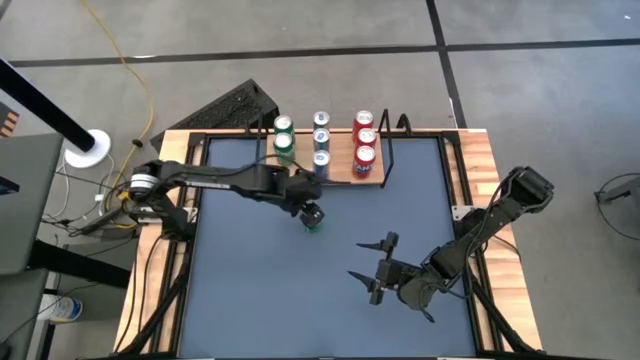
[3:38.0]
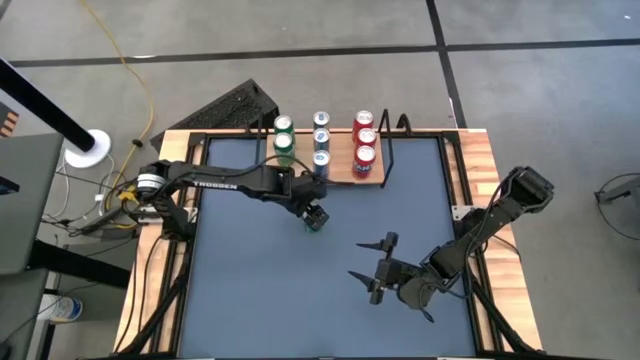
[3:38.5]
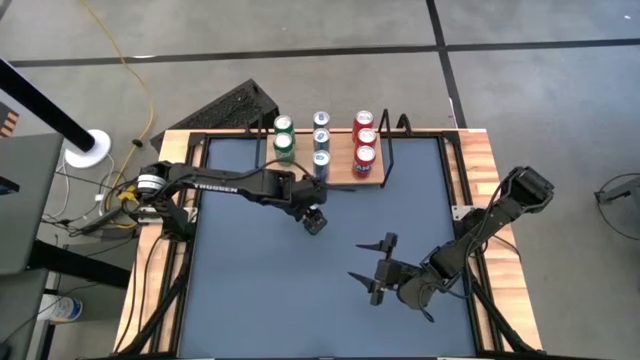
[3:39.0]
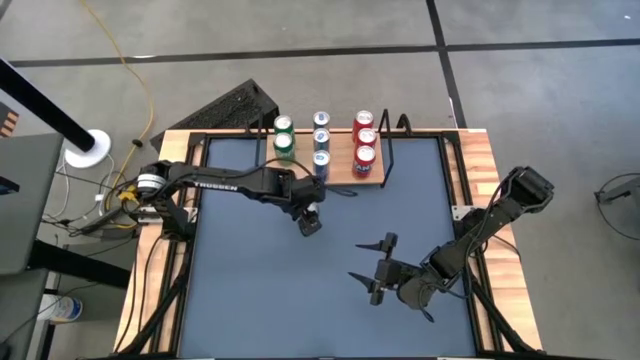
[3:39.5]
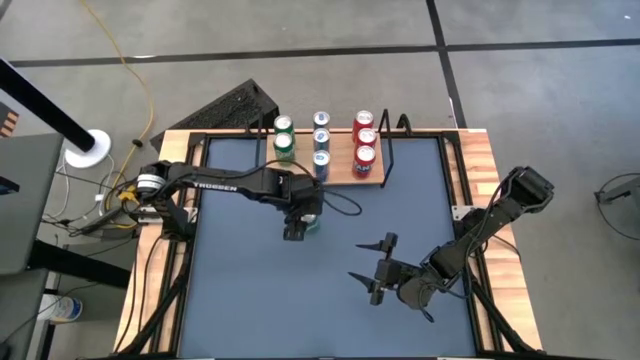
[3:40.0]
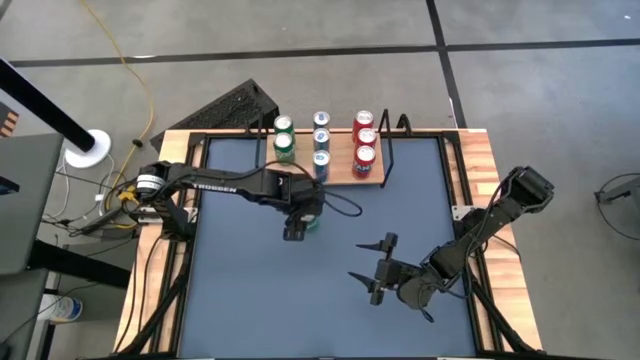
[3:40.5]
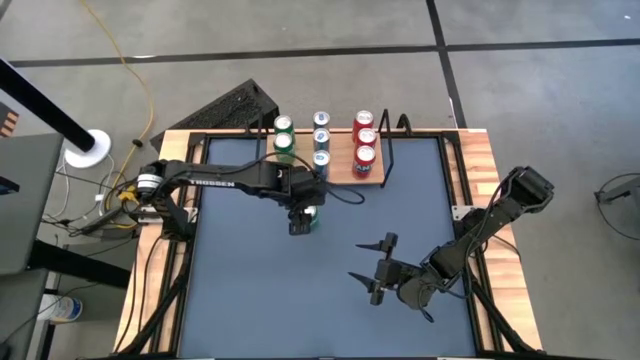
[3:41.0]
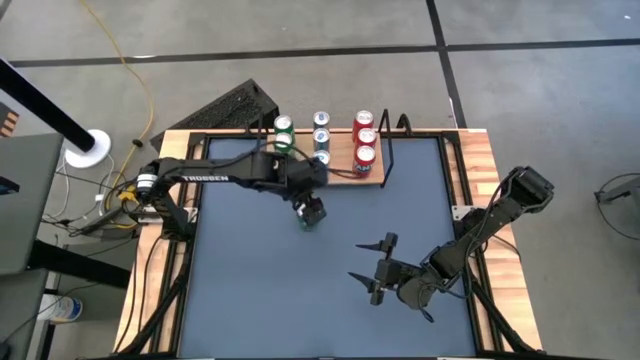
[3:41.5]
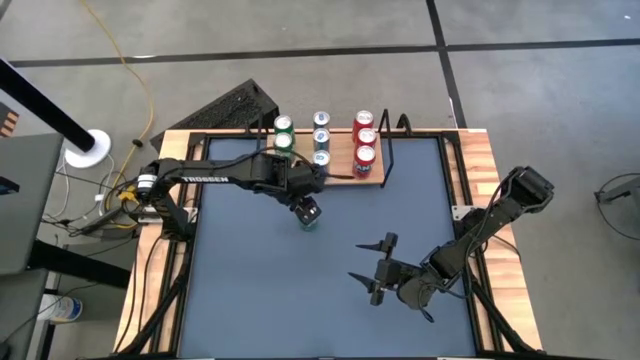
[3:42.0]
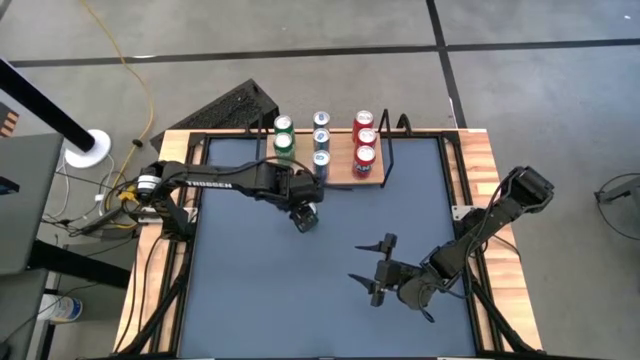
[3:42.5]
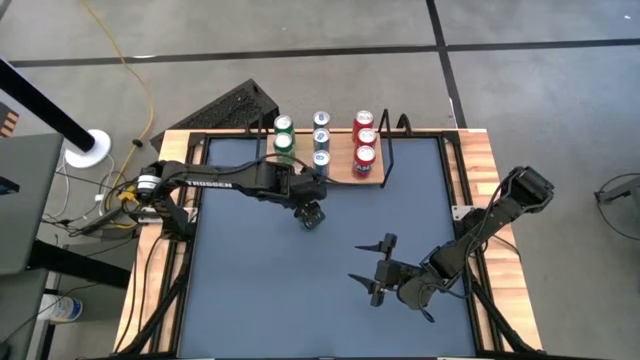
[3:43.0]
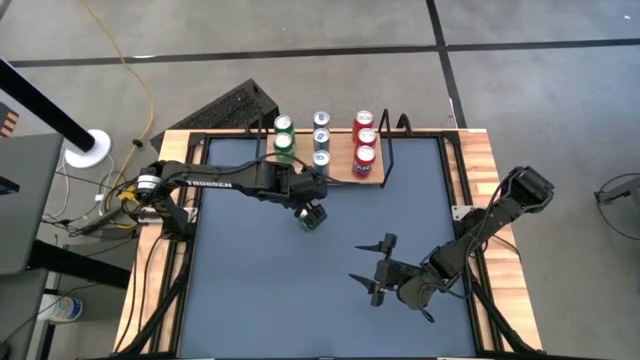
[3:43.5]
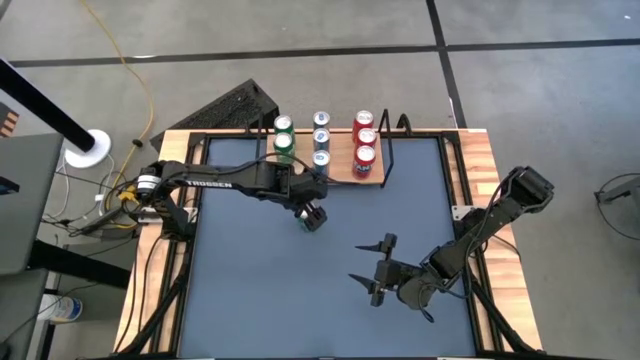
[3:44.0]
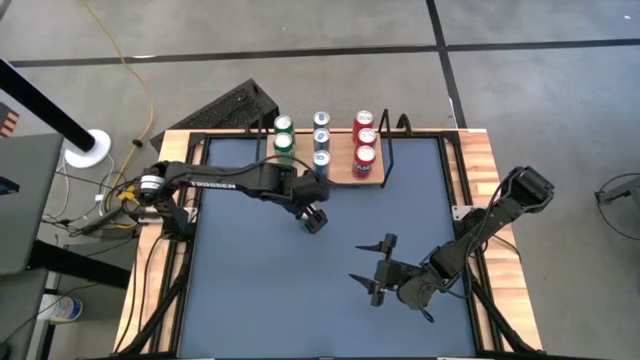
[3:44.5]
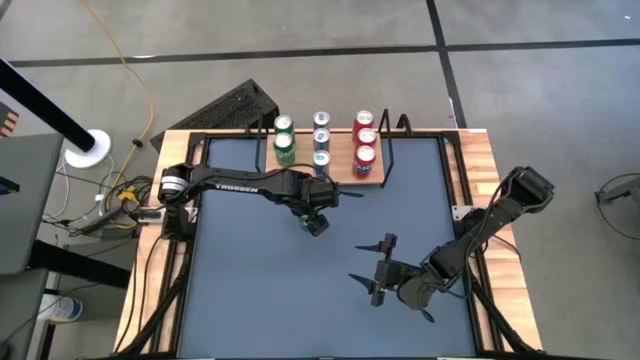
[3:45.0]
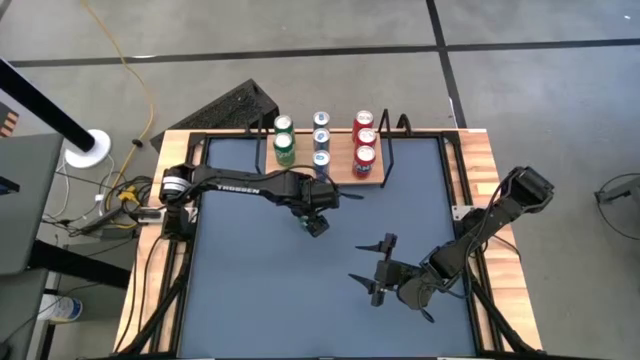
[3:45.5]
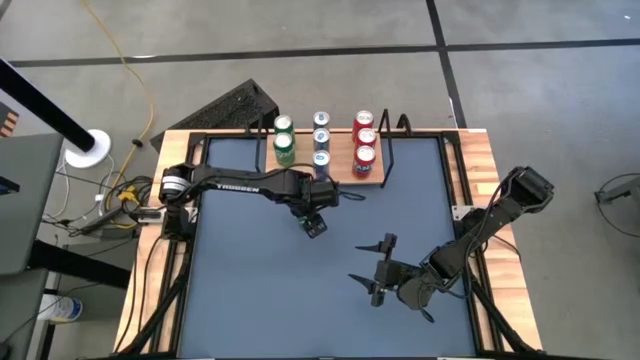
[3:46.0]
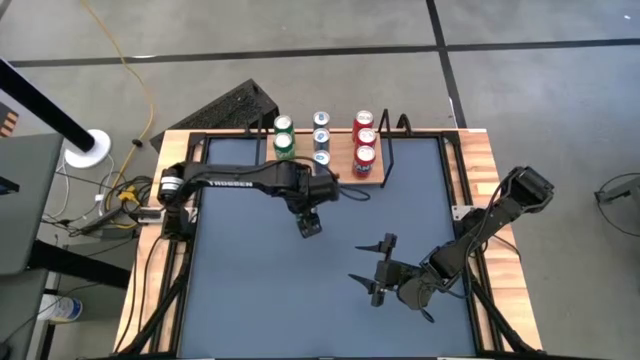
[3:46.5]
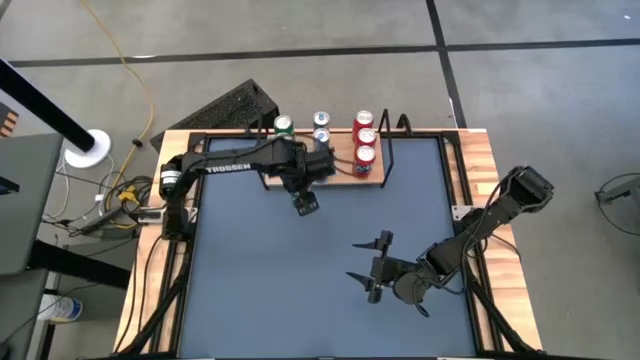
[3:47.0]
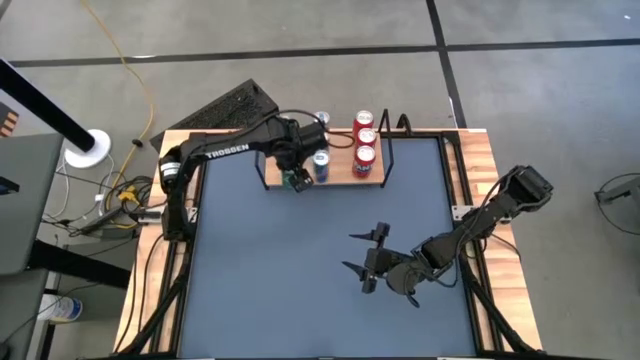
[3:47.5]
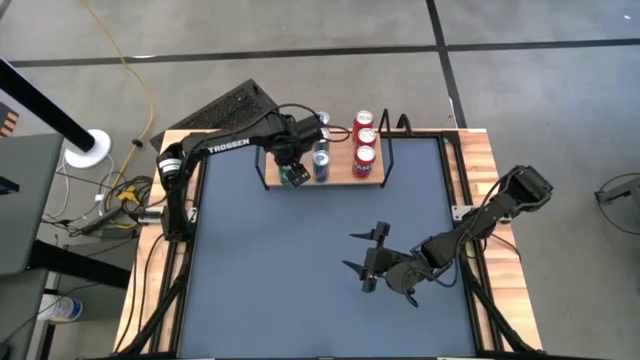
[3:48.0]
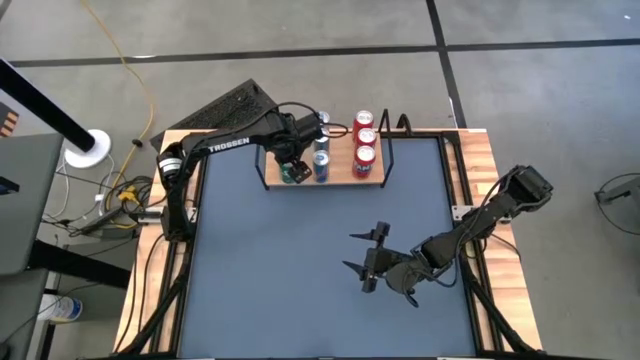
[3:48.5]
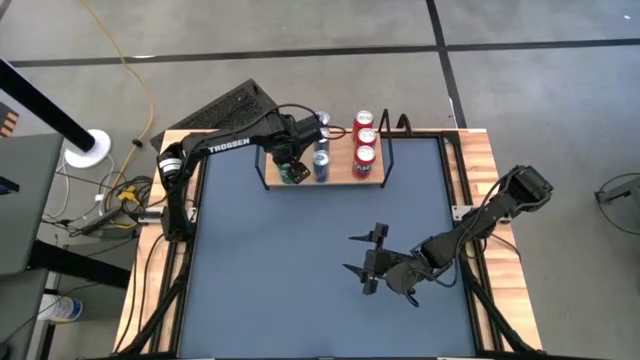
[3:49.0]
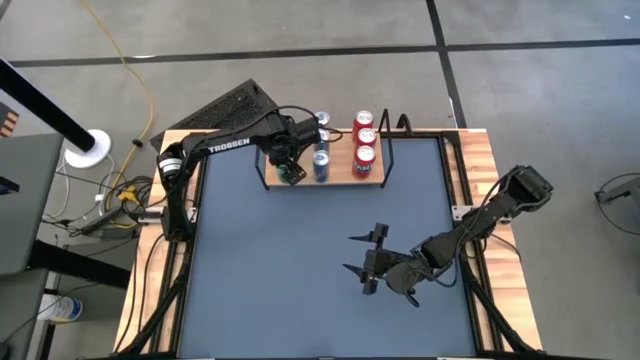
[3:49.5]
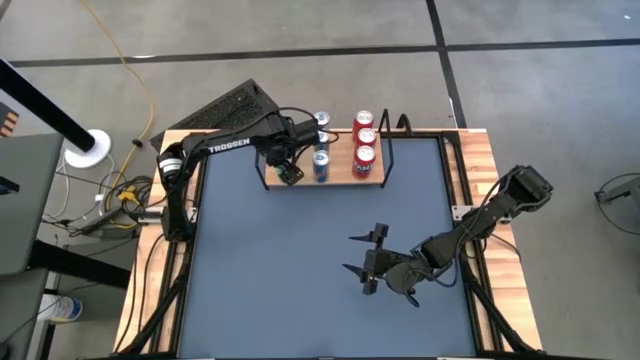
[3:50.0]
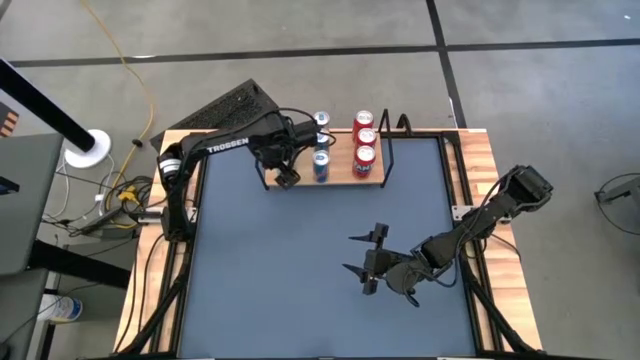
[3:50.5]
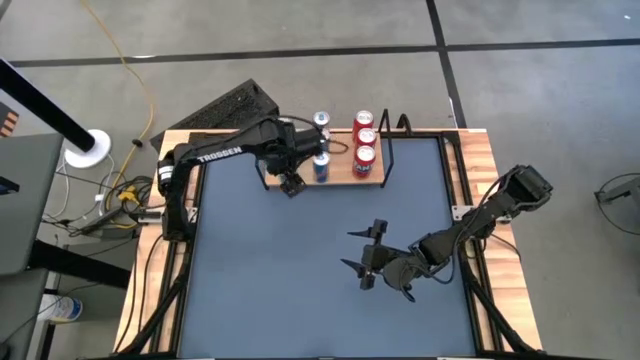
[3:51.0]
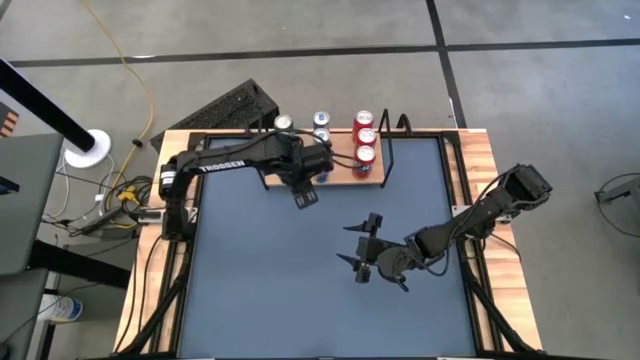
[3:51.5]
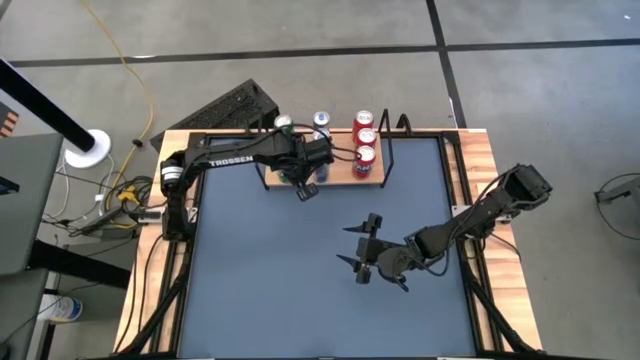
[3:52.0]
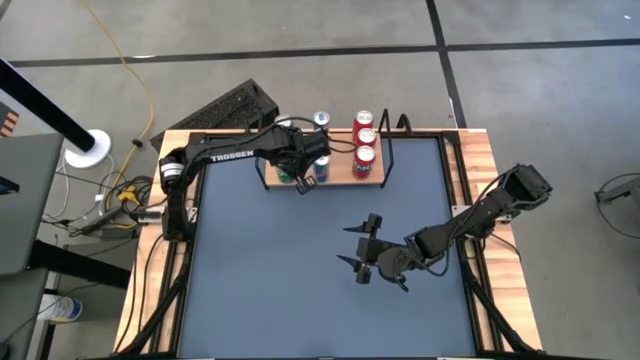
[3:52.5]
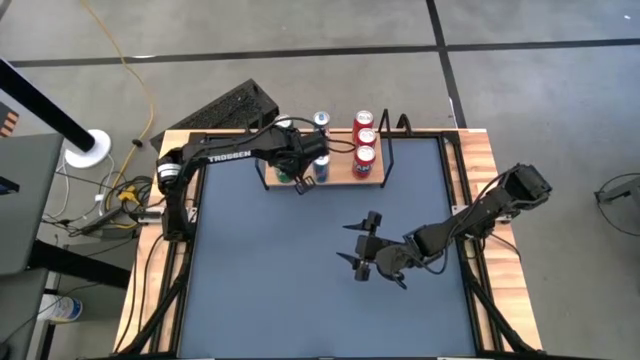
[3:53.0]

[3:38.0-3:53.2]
Task: Place canned beverage on shelf
Put the green soda can on the shelf aligned with the other green soda cans

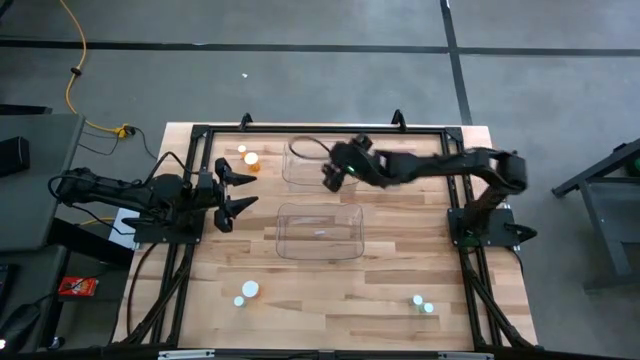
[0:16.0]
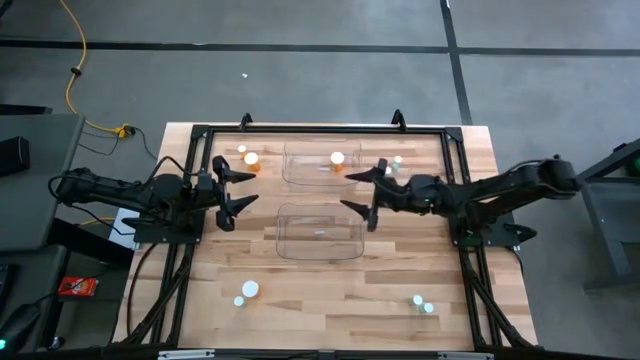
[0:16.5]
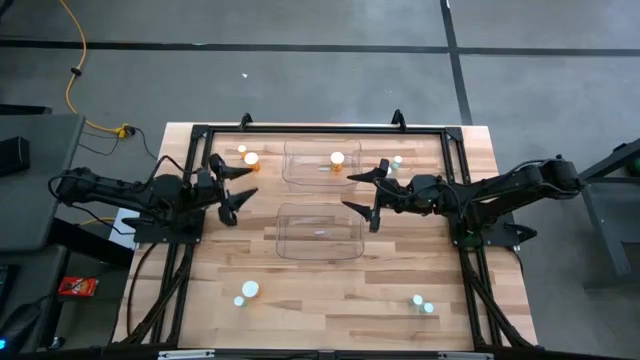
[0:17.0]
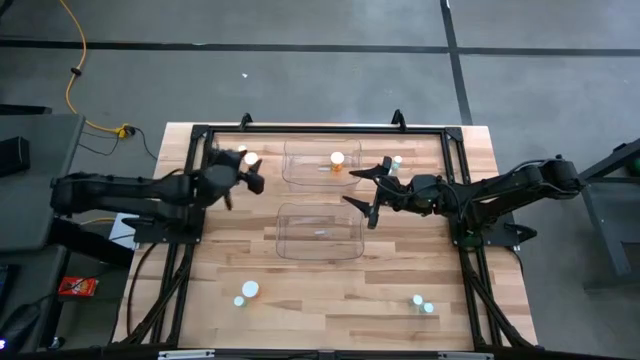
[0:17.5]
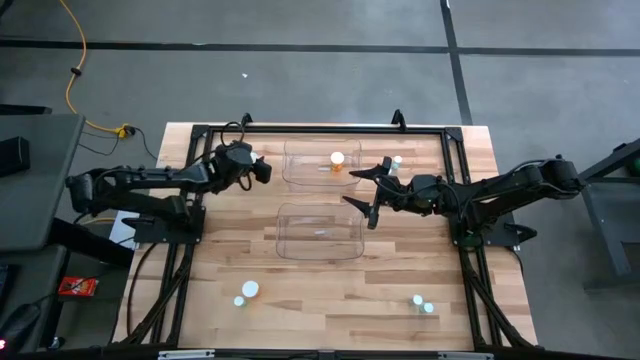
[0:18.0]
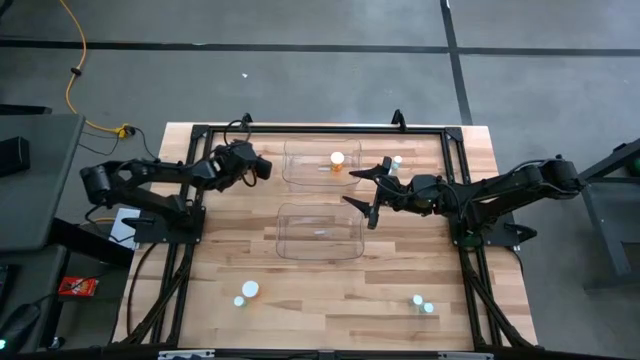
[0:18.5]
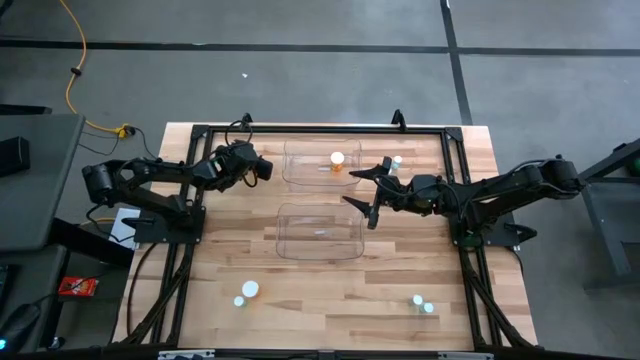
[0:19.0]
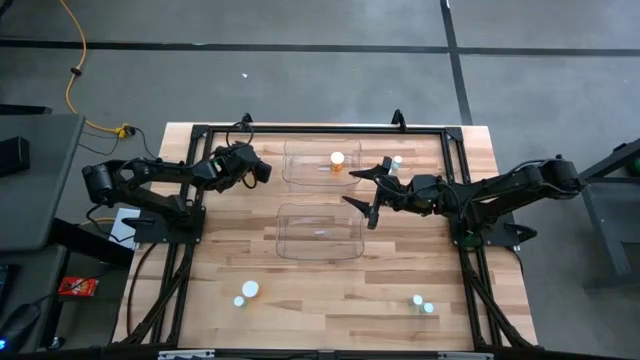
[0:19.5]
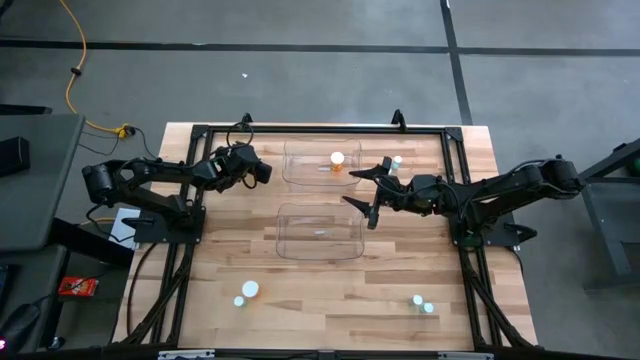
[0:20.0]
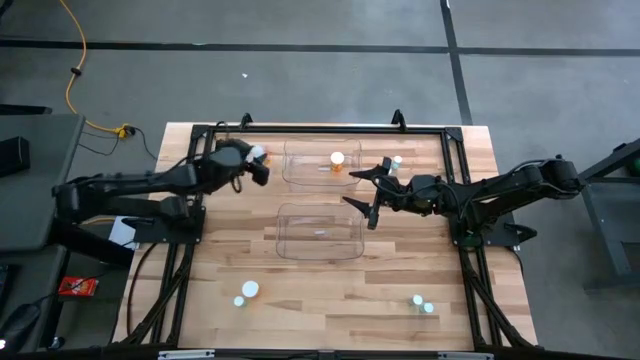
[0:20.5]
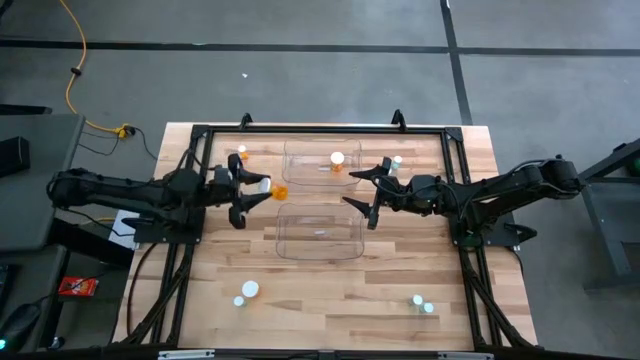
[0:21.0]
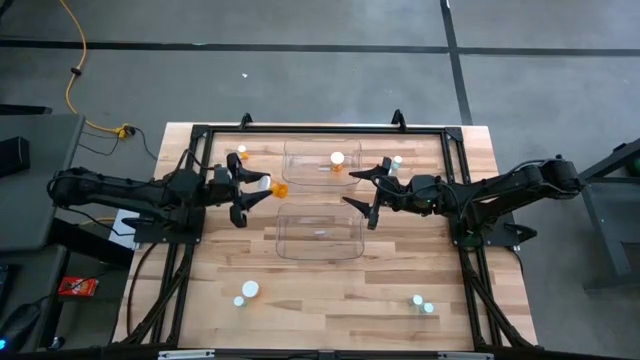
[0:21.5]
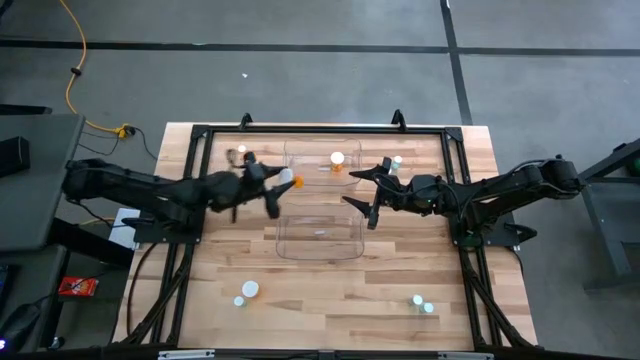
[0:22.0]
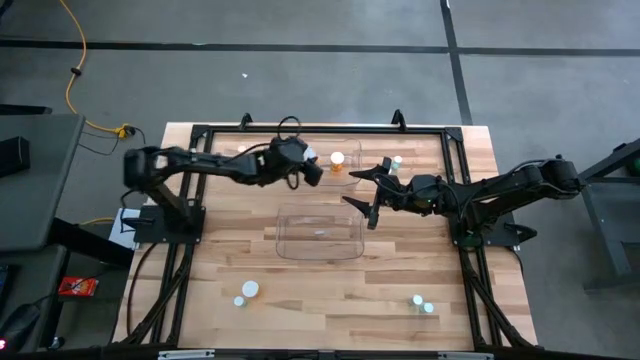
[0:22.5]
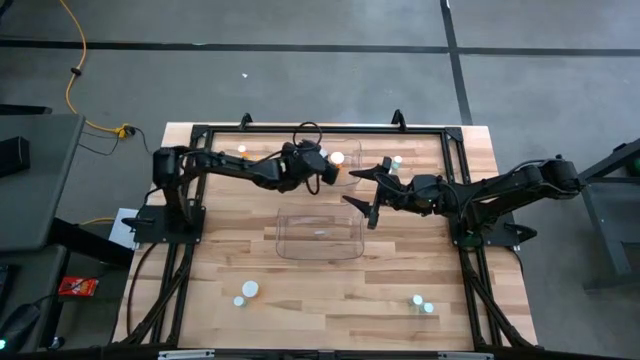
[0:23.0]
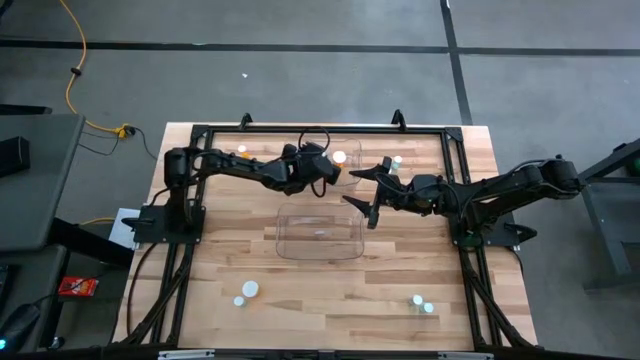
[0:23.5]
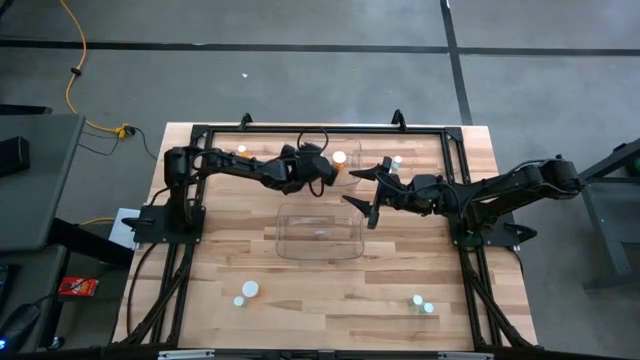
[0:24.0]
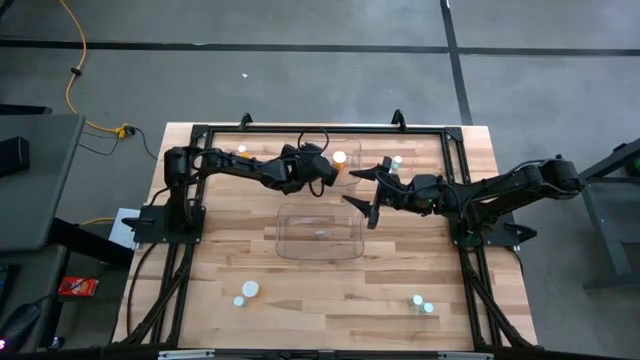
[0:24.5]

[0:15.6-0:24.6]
Task: Pick and place medicine bottles into bin by pill shape (circle, oval)
Put the orange capsule bottle into the top transparent bin
